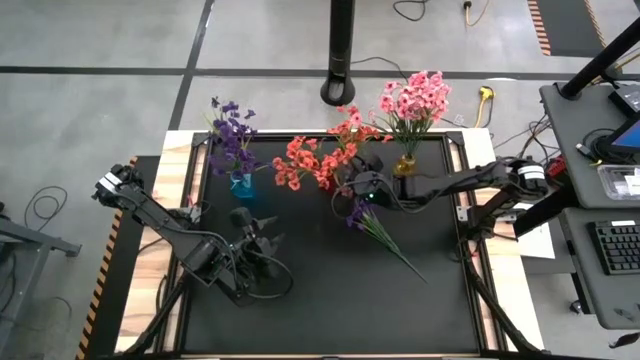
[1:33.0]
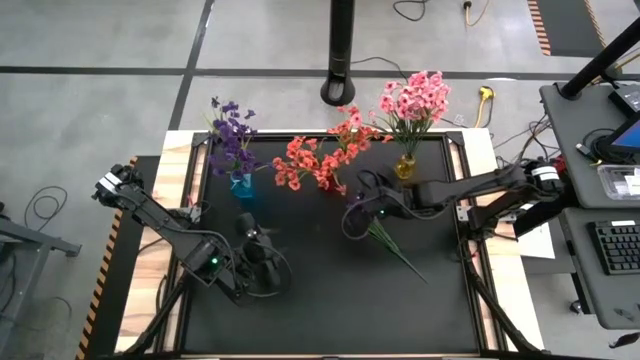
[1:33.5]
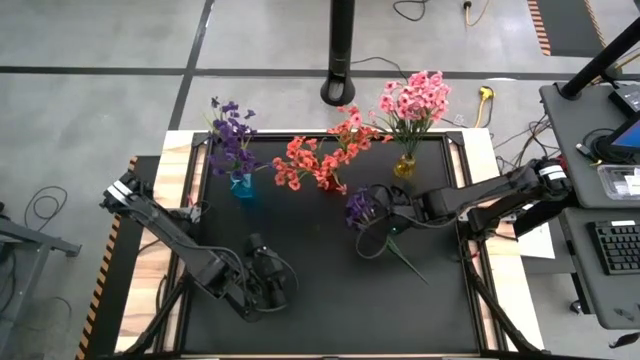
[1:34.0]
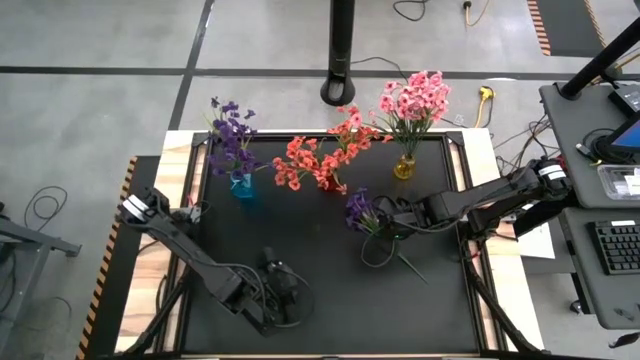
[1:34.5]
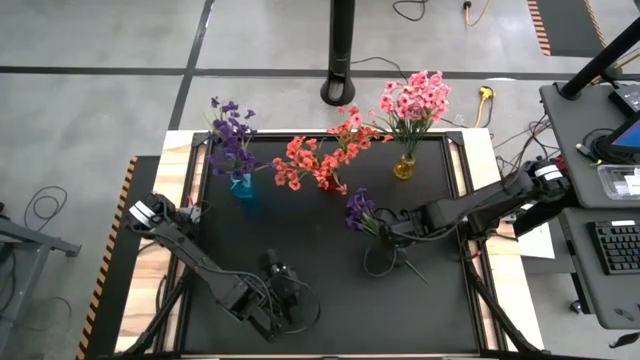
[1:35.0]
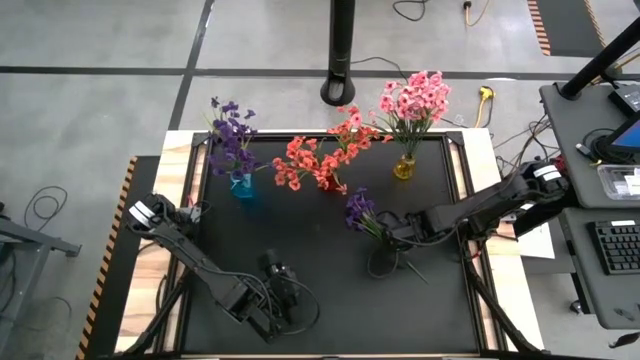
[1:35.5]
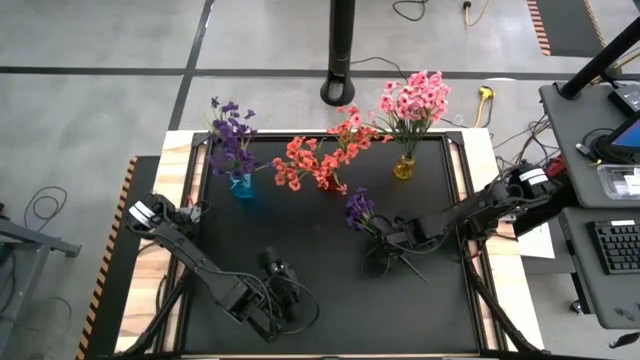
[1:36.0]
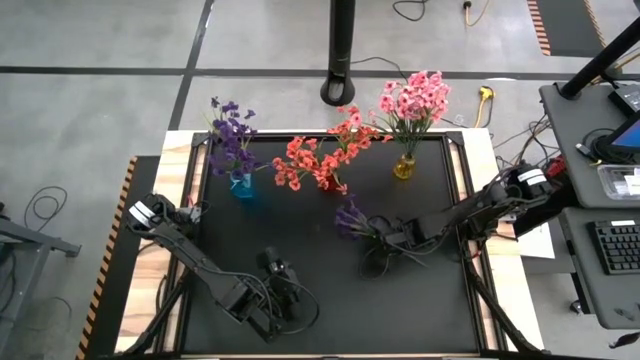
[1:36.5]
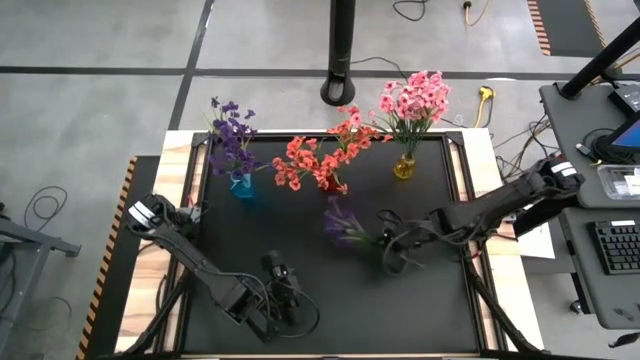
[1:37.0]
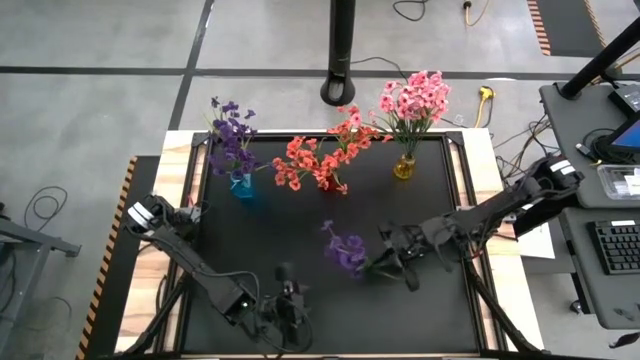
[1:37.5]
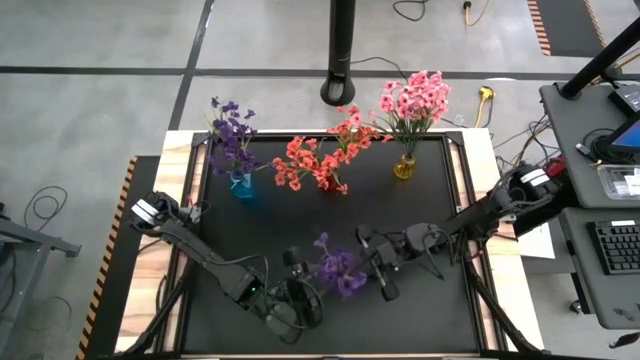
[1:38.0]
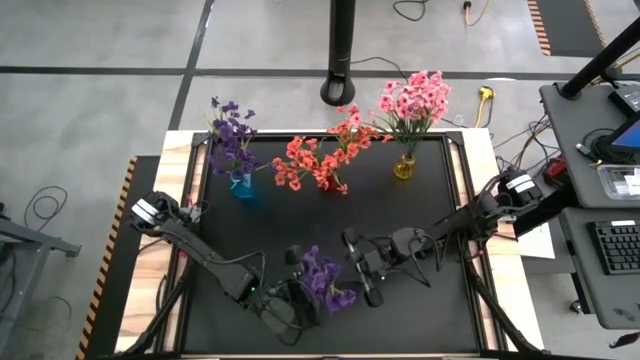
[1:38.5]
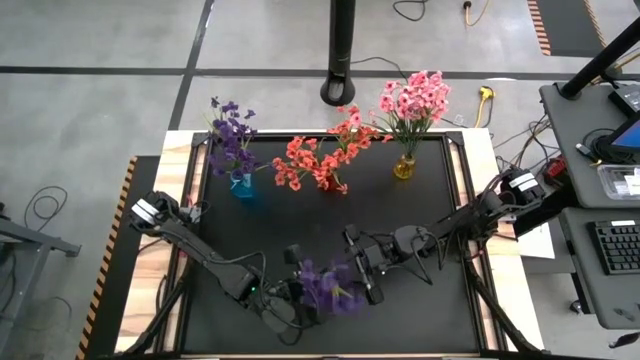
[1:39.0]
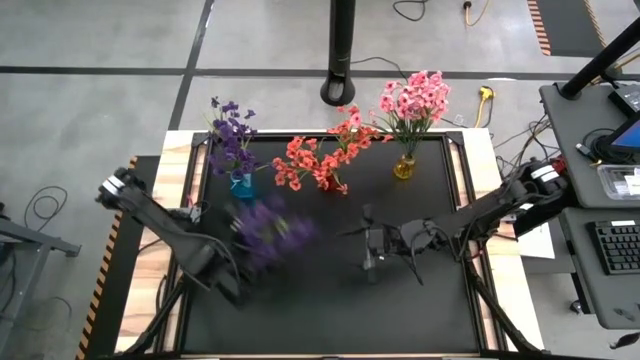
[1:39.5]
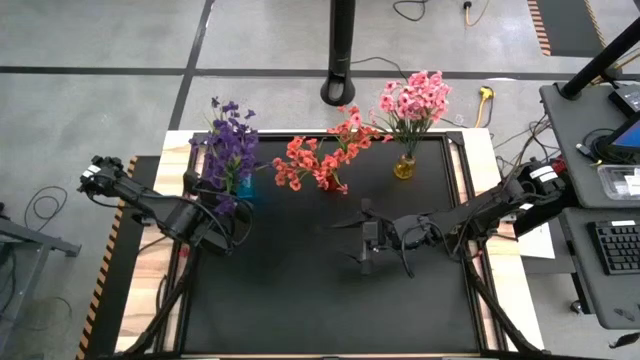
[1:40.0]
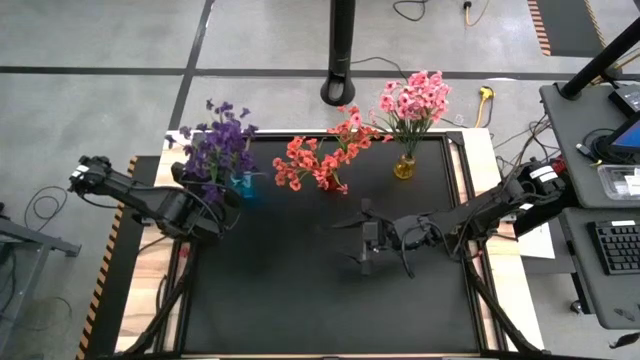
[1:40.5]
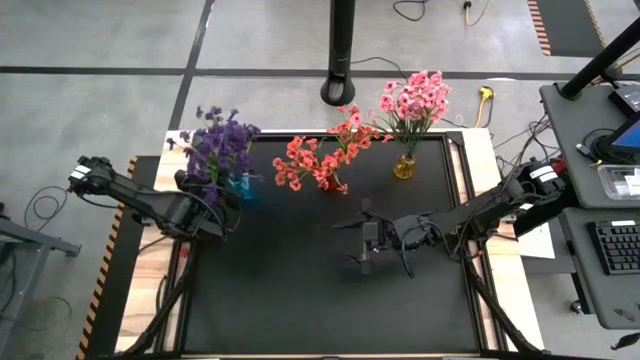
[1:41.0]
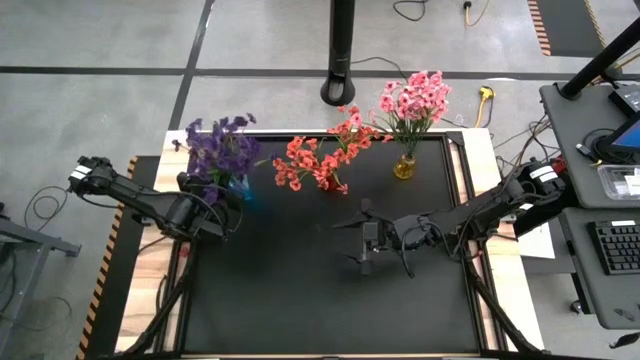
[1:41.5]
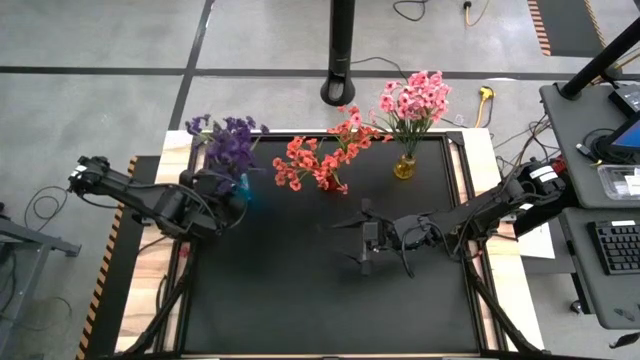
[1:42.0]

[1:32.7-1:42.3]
Task: Sort flowers into vase by color
Put the violet flowers into the blue vase

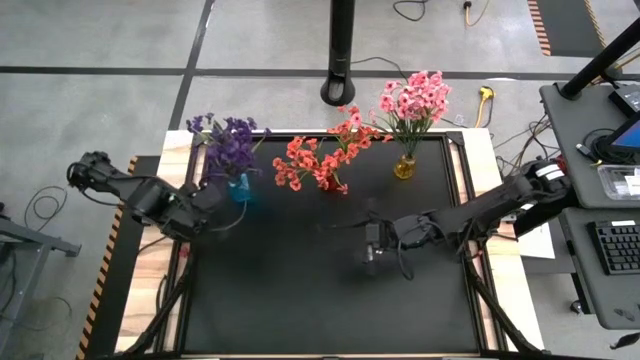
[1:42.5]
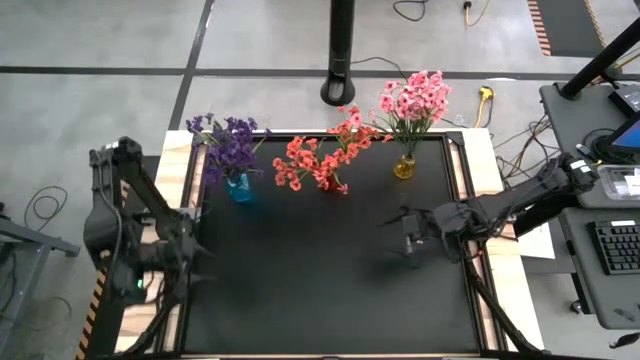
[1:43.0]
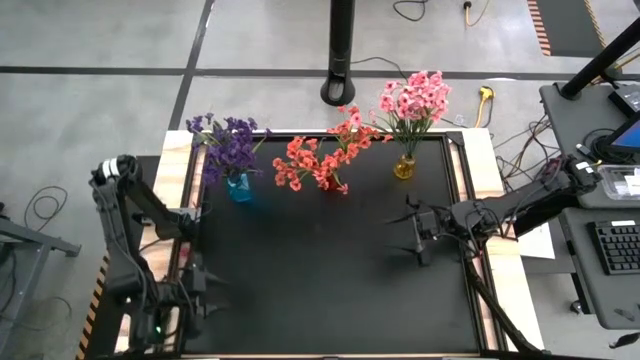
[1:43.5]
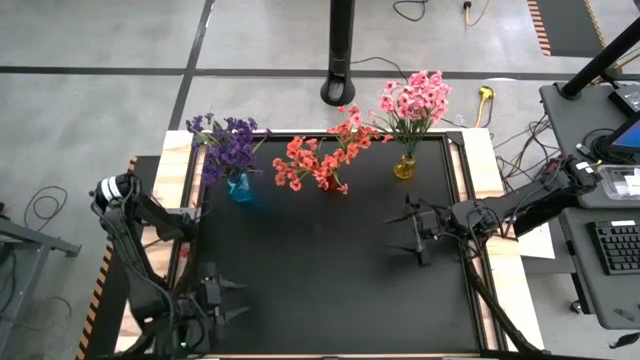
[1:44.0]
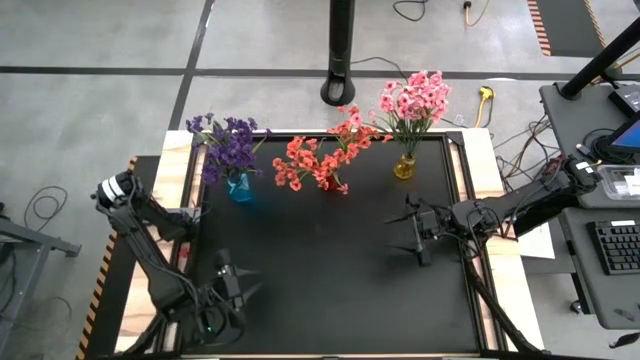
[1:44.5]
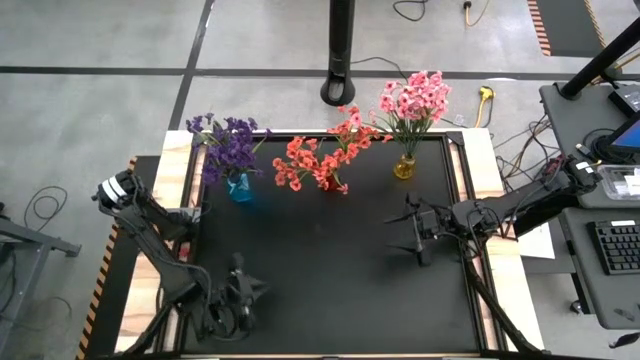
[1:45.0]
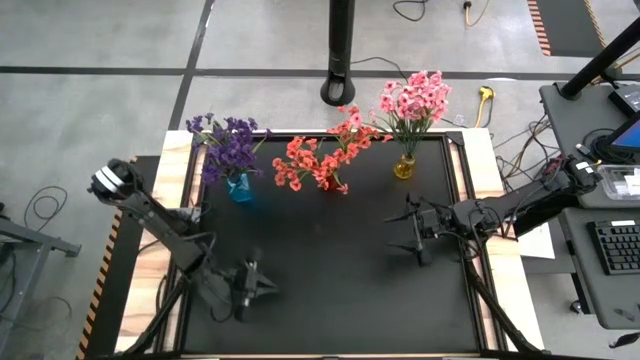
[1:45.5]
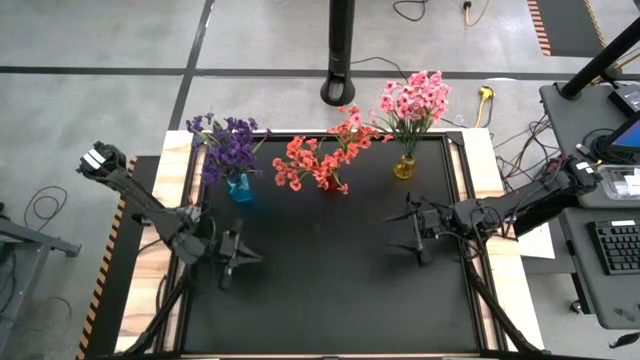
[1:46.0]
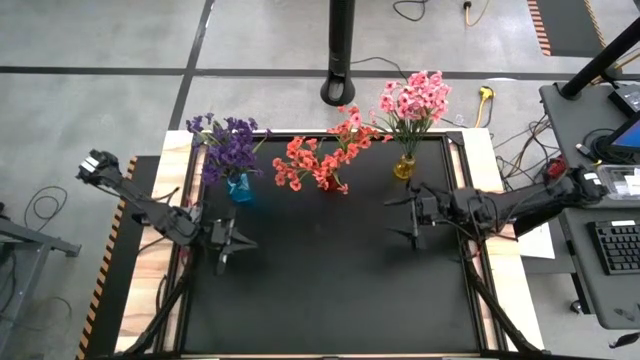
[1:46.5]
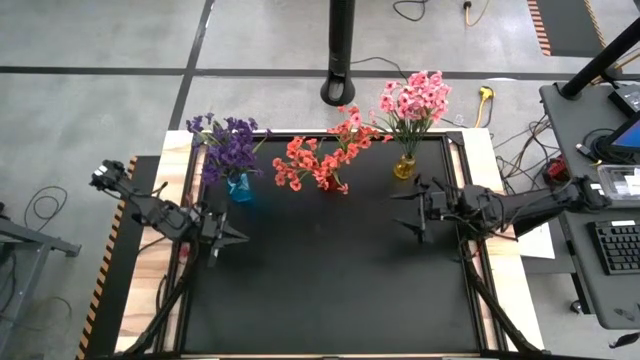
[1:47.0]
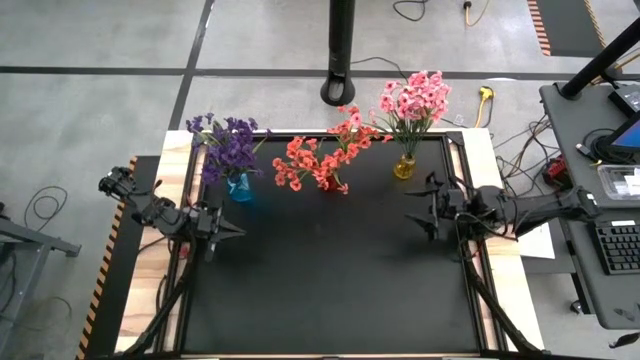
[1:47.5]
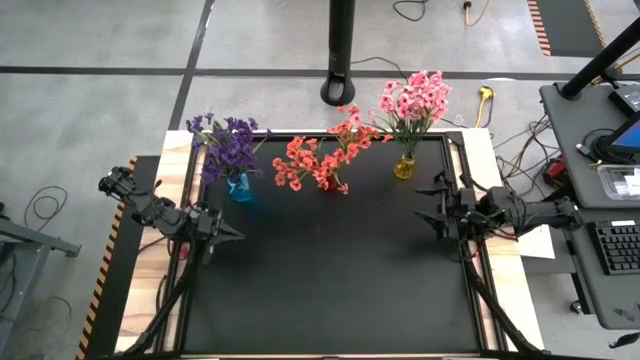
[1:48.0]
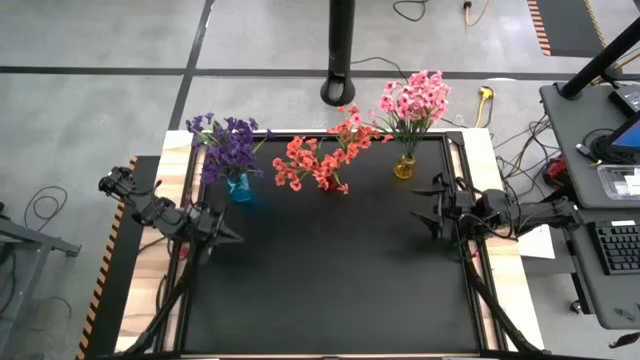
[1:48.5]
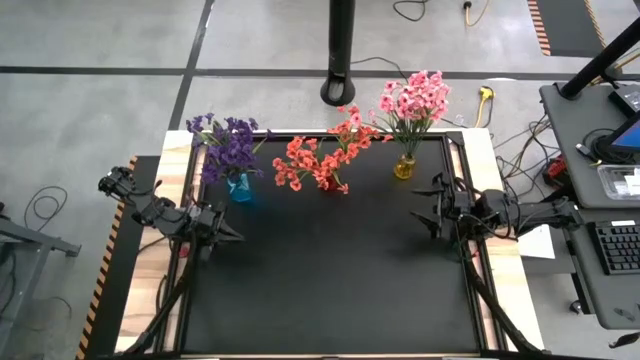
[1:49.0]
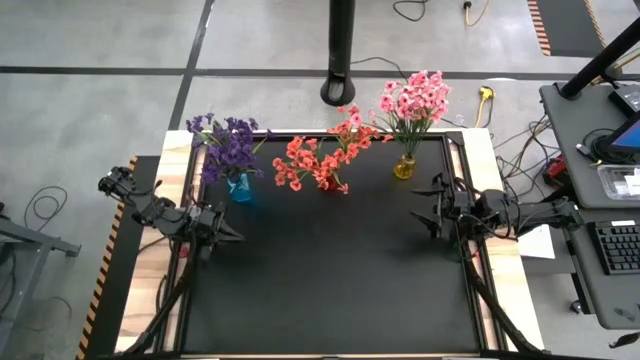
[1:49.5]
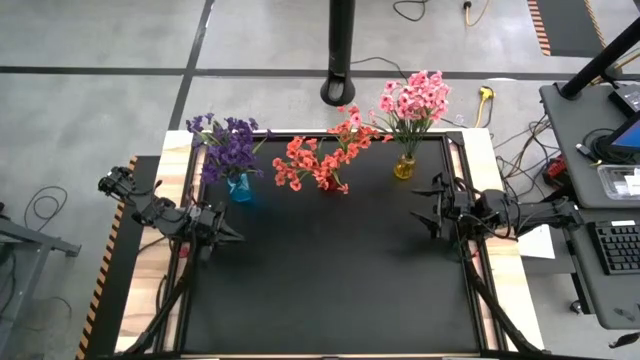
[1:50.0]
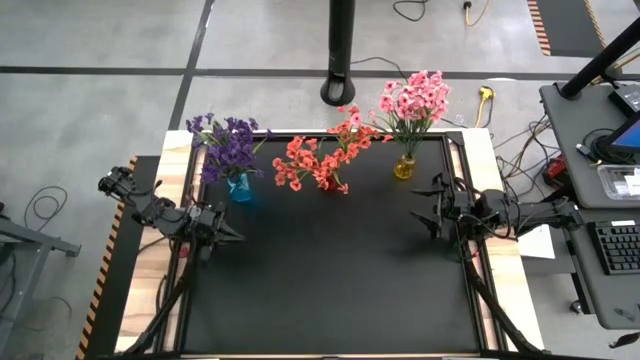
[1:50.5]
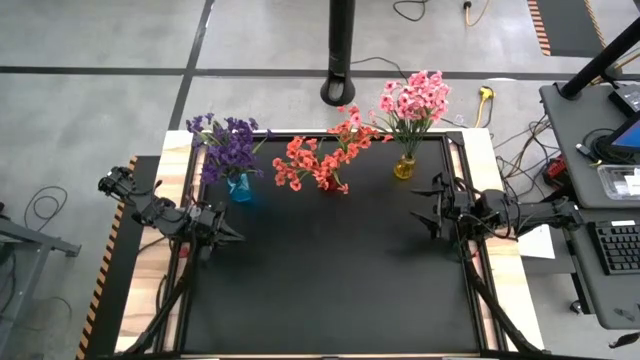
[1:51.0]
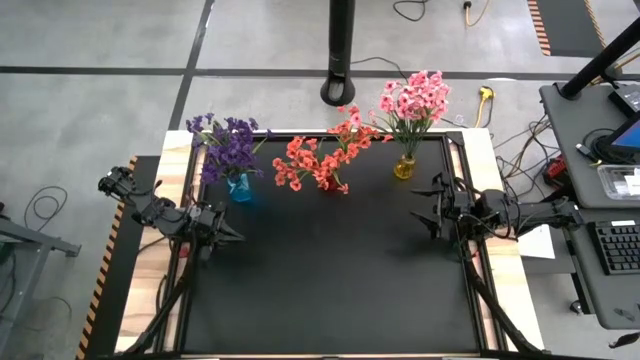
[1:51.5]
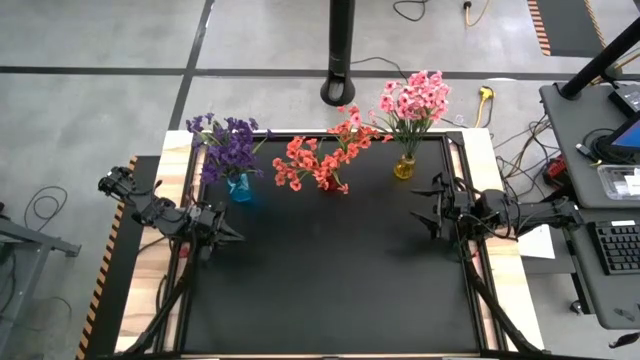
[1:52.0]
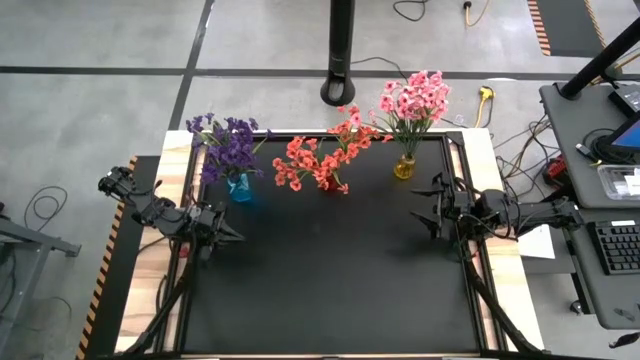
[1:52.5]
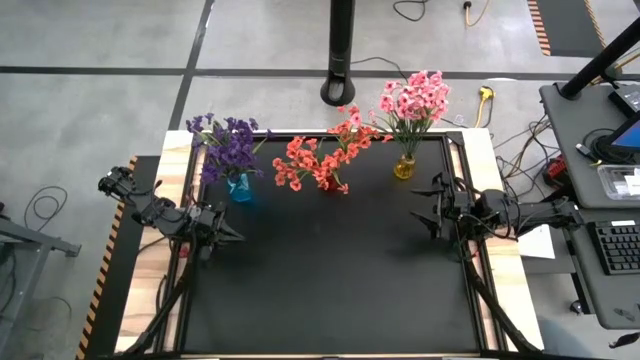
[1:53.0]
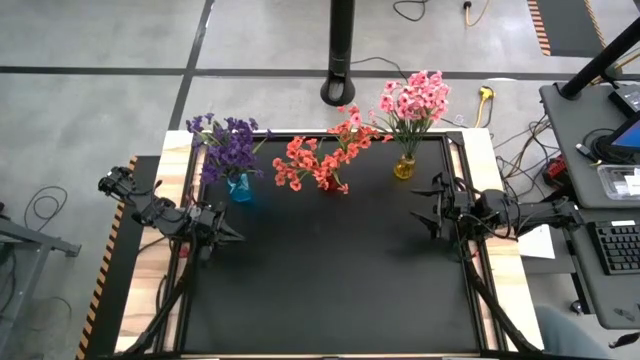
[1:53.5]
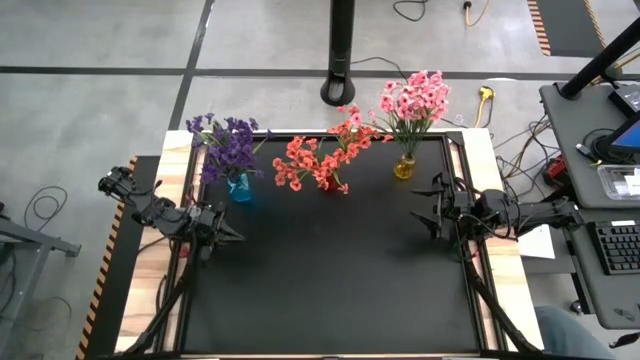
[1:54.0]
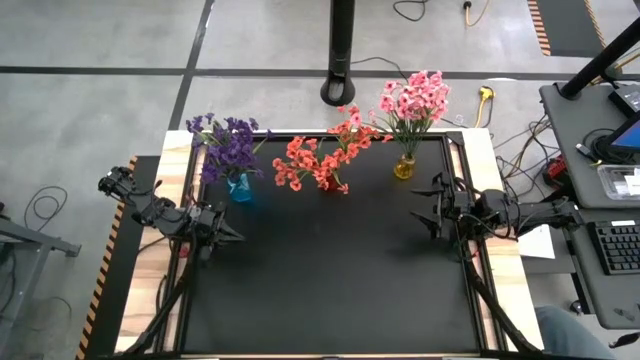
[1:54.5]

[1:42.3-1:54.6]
Return to Home Position
